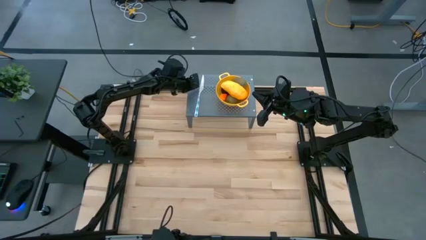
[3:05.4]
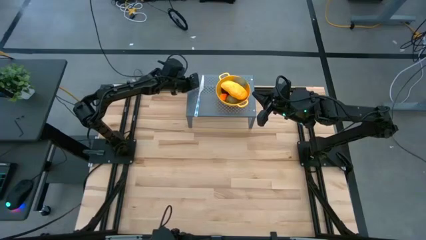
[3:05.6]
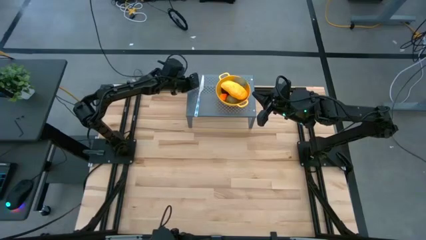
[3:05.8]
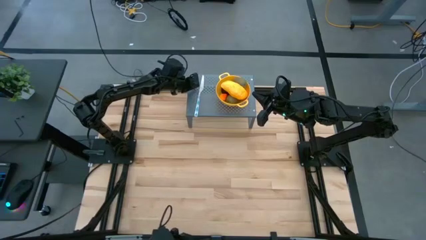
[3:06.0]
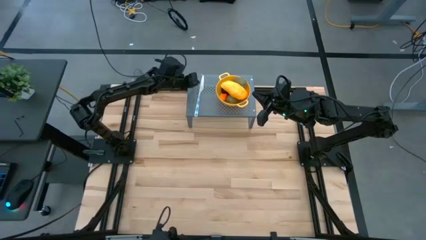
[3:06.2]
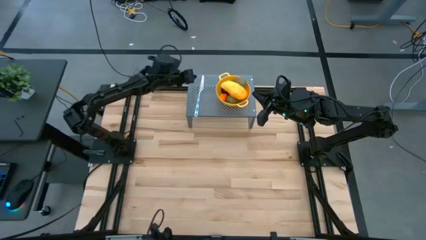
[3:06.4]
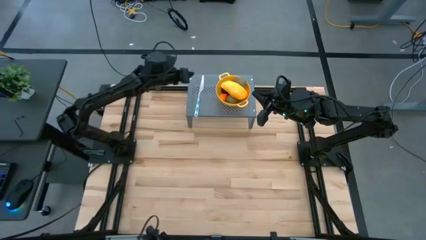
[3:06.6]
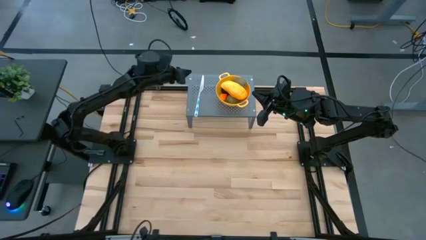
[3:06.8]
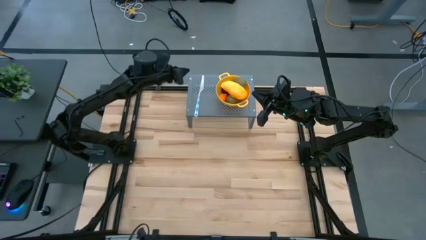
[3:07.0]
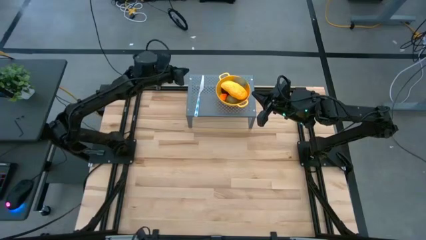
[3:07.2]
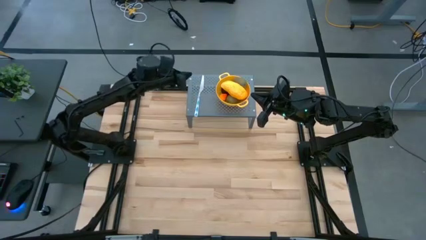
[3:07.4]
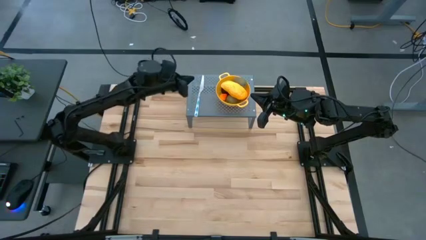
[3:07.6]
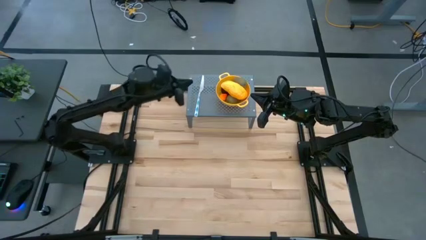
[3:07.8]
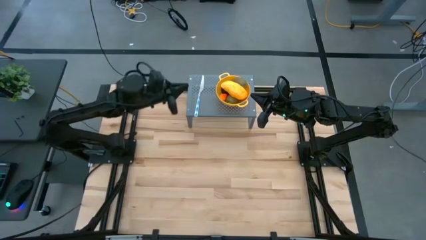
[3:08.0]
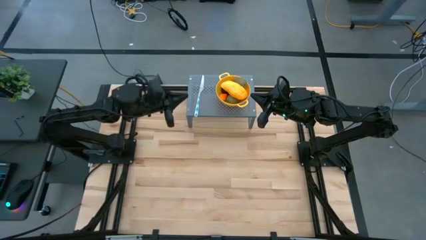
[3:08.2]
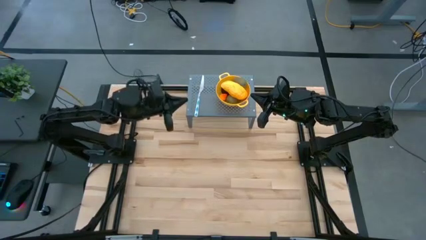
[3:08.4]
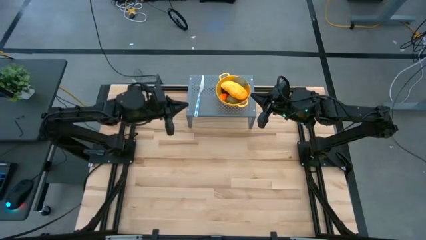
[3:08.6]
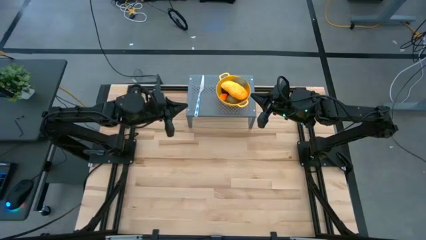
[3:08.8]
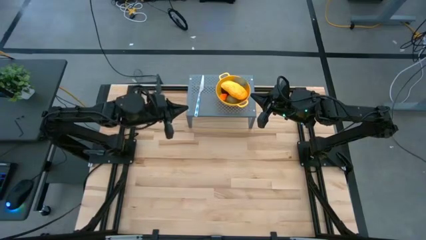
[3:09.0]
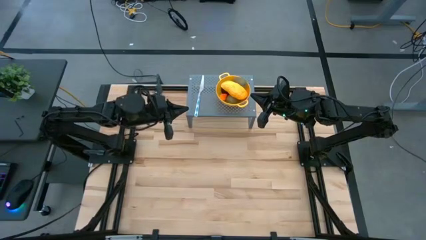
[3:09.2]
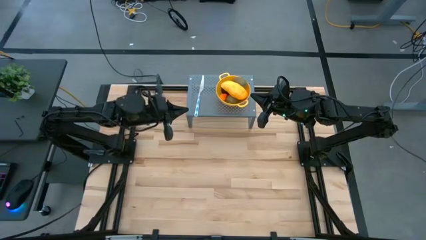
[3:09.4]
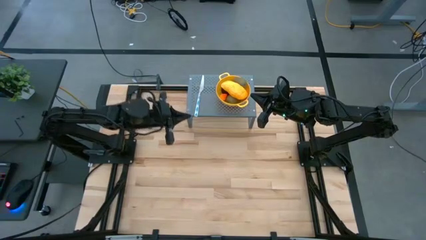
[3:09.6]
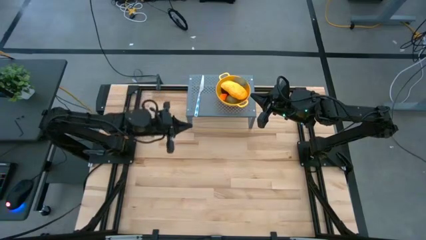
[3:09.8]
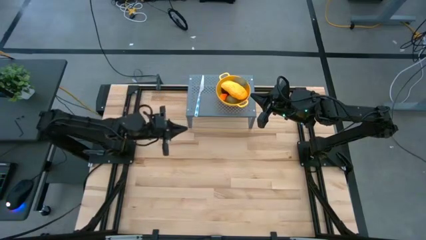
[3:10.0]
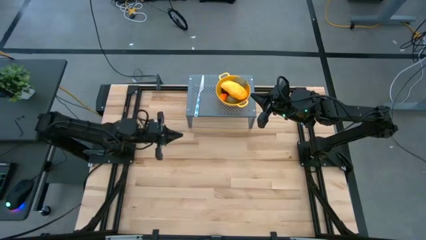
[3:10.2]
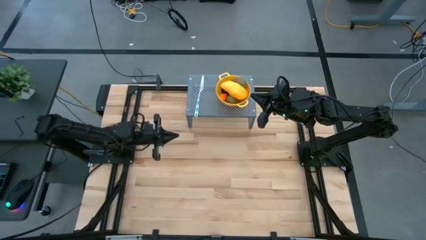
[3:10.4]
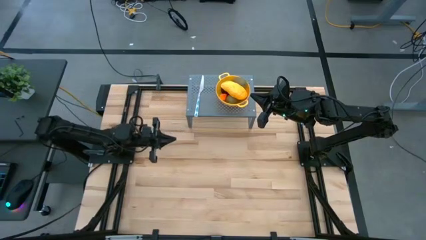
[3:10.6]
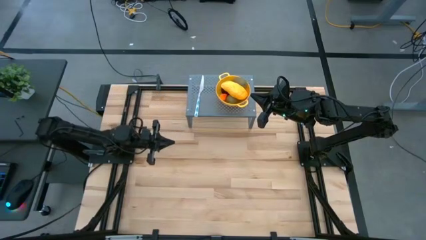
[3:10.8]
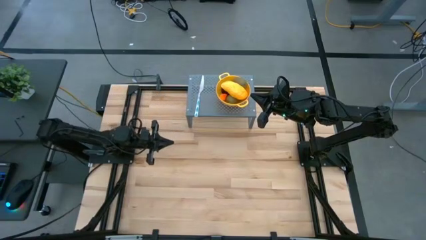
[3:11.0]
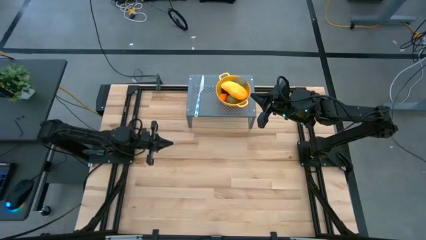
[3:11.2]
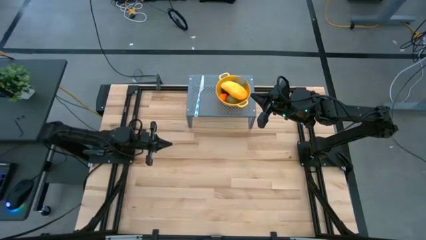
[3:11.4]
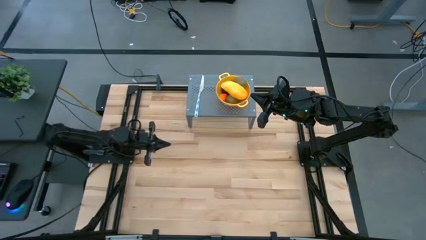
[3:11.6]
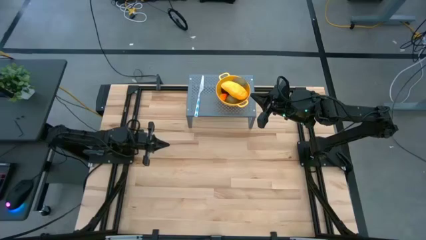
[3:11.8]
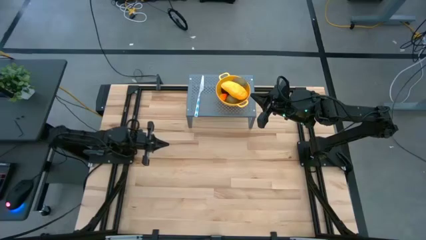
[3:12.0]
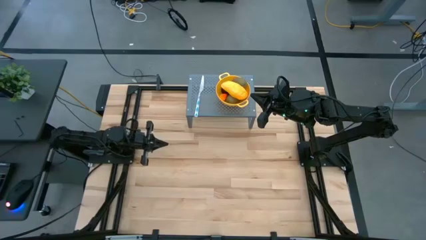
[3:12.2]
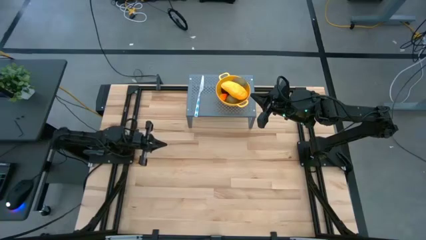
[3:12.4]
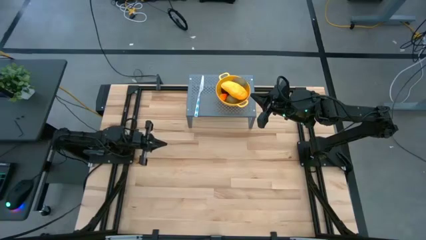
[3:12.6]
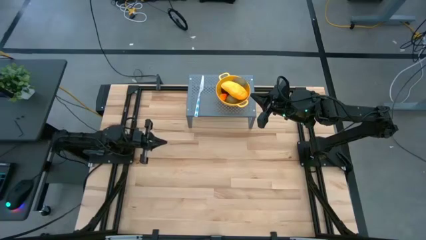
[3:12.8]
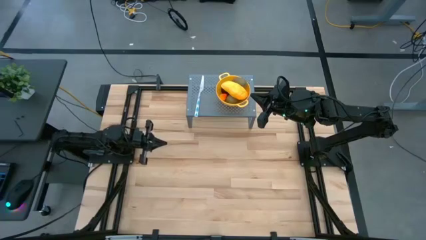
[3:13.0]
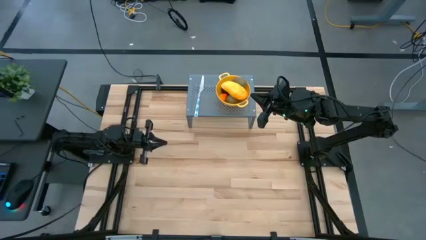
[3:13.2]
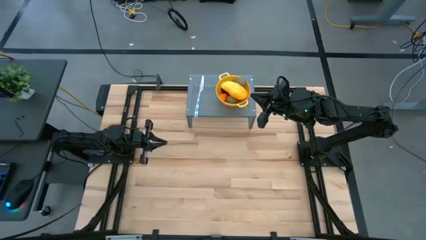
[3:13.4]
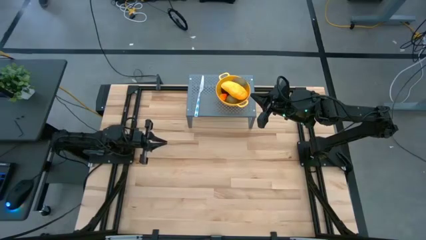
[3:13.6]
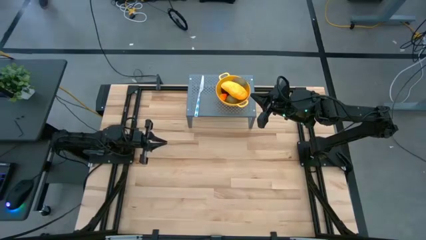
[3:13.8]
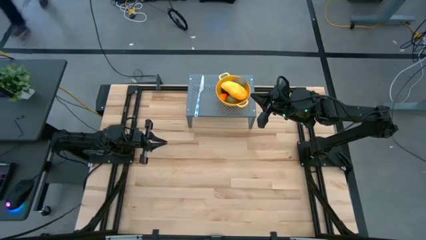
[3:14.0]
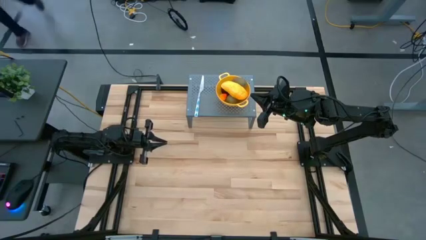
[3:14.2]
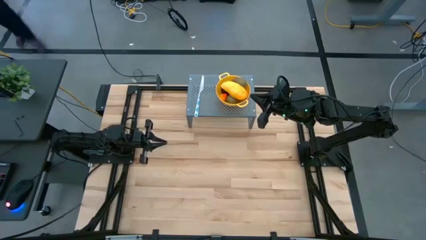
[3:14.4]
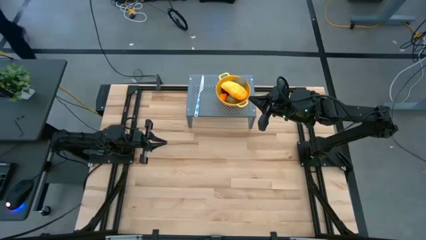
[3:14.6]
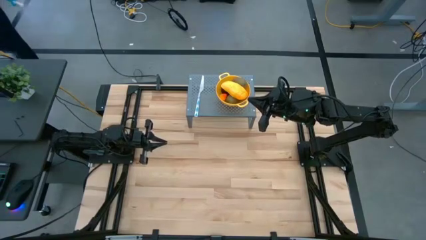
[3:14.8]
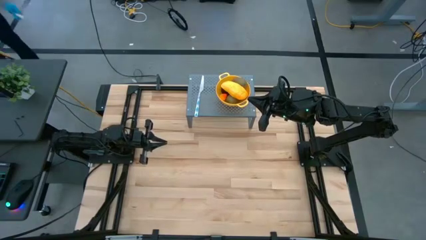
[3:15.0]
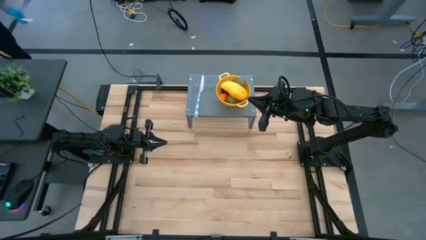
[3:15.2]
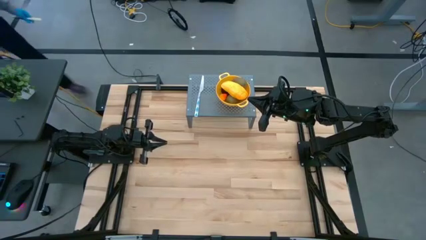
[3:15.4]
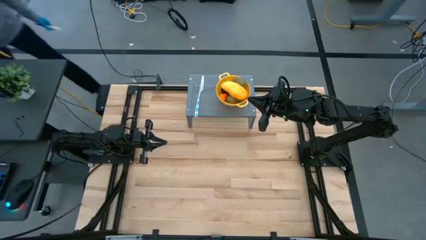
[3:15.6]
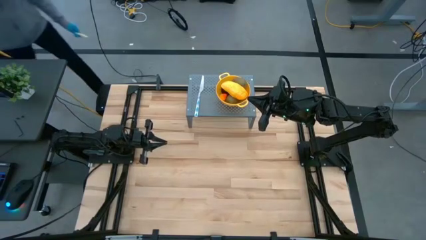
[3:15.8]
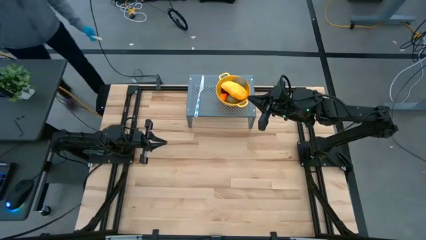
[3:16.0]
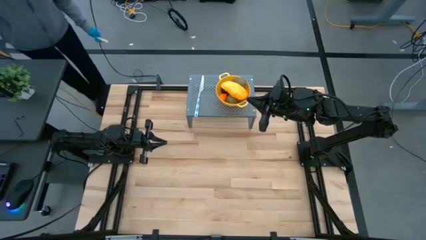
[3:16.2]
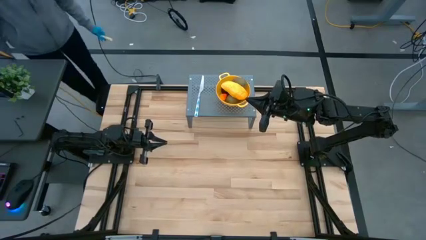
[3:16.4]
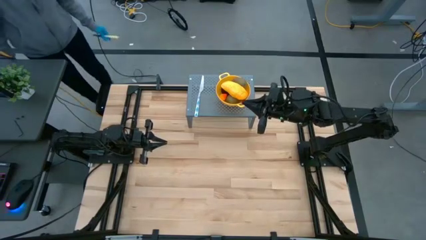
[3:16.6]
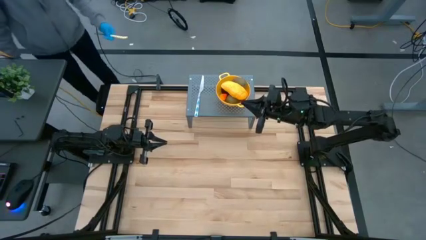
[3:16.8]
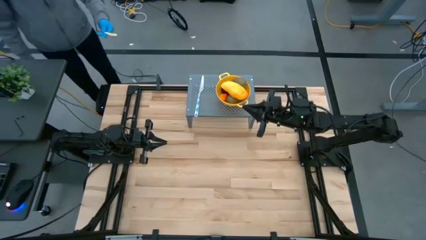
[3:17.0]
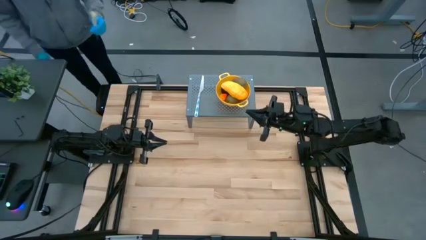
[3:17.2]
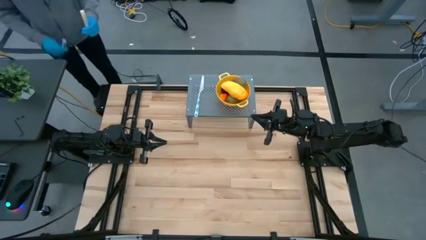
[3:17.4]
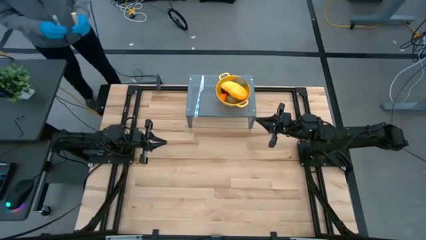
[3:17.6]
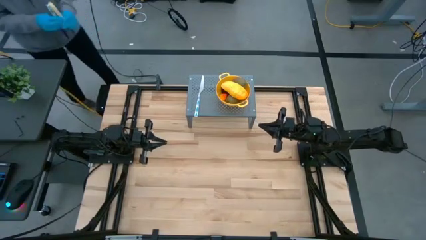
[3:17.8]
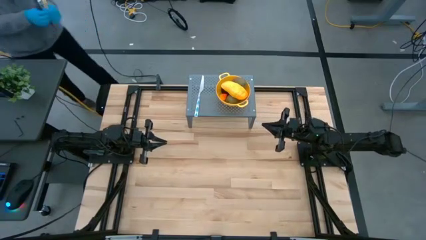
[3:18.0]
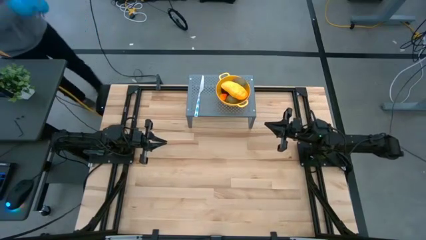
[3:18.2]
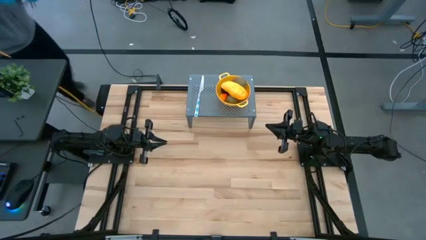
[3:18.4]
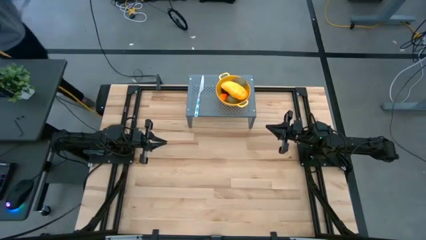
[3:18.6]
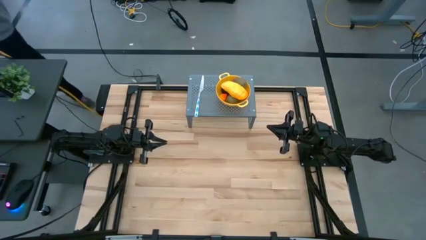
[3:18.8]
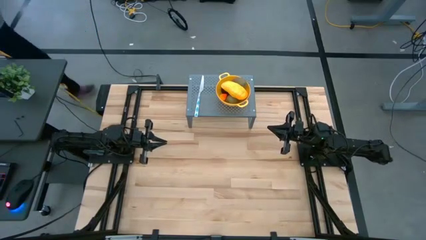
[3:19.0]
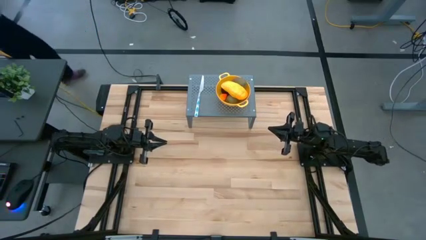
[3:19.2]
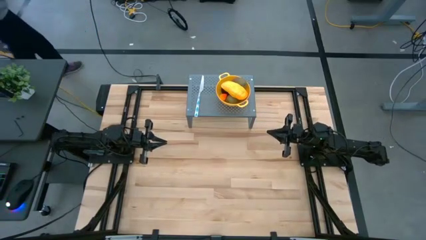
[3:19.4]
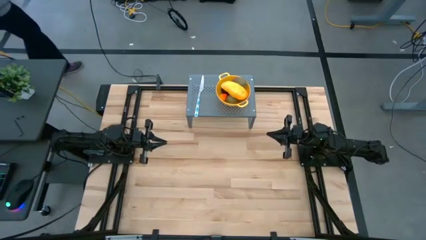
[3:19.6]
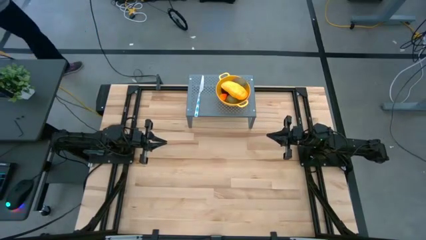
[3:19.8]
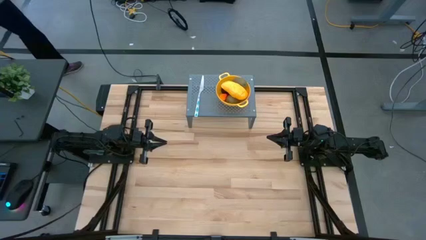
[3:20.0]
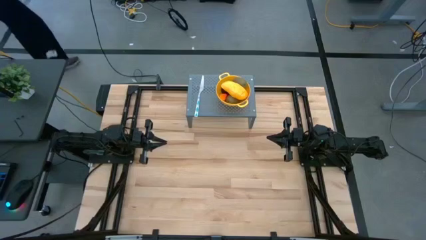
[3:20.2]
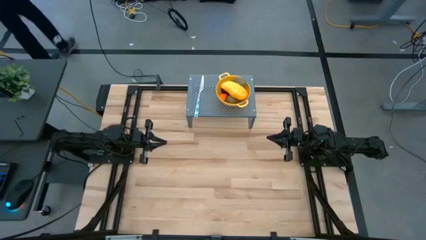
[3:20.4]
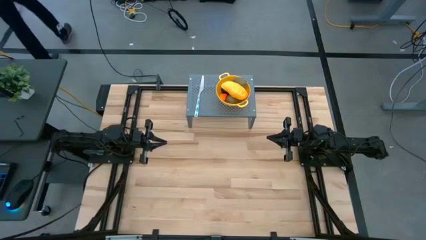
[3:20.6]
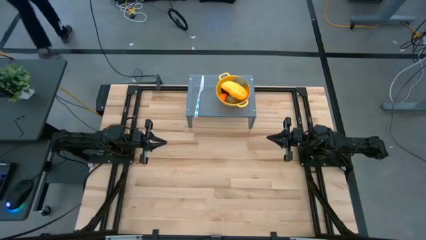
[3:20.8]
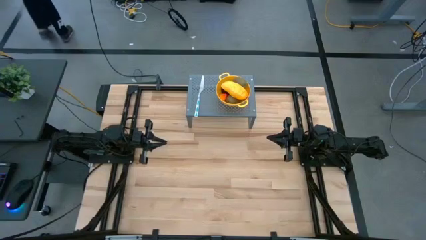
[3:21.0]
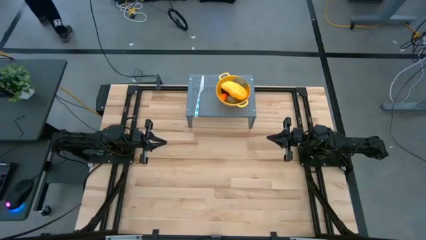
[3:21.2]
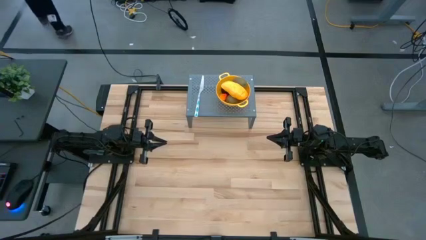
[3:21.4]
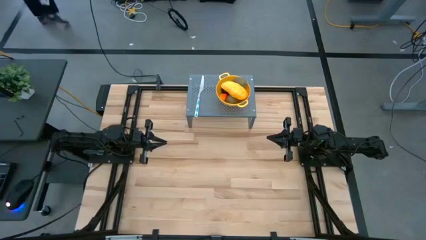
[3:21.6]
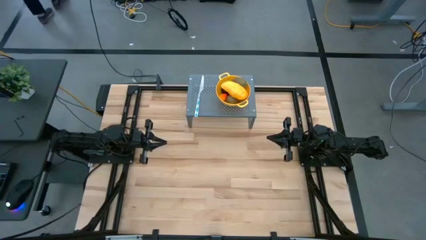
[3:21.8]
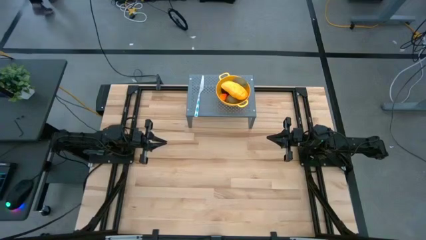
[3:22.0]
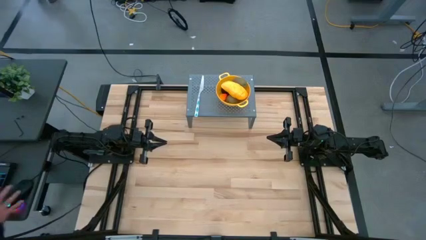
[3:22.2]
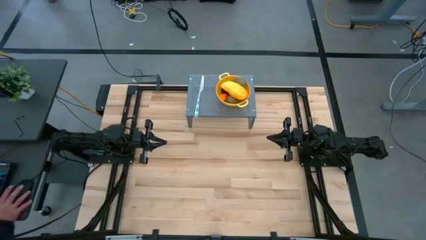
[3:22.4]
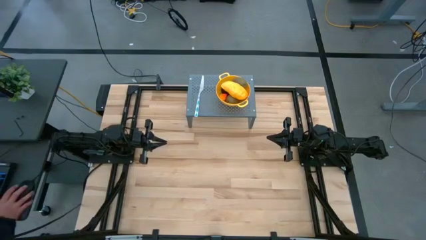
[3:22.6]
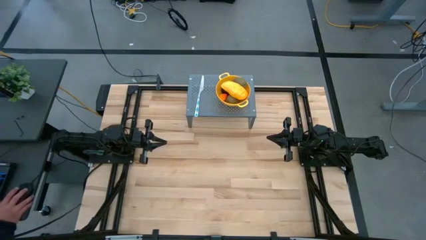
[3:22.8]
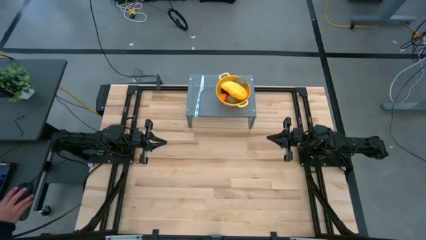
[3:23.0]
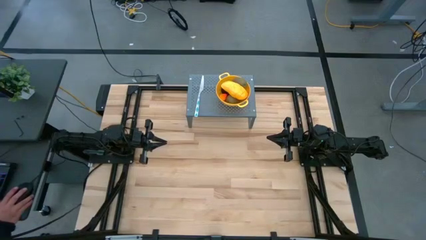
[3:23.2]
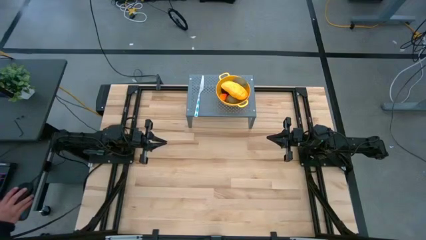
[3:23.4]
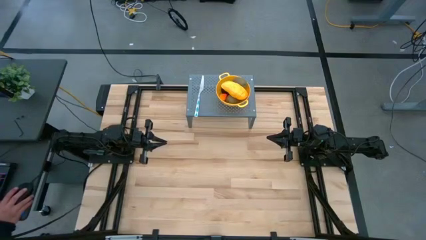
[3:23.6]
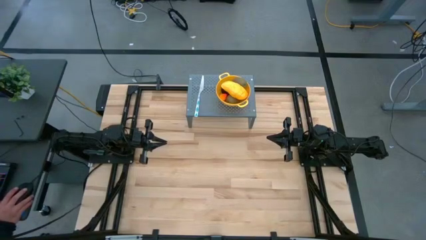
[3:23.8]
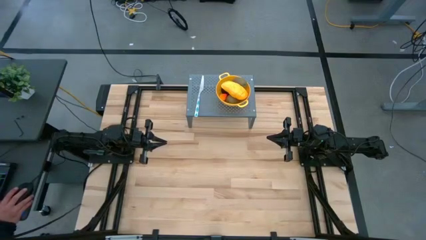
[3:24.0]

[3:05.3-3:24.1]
Task: Pick & Place Fruit
Return to Home Position
